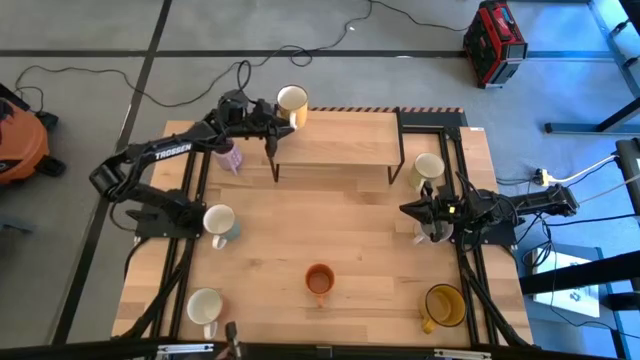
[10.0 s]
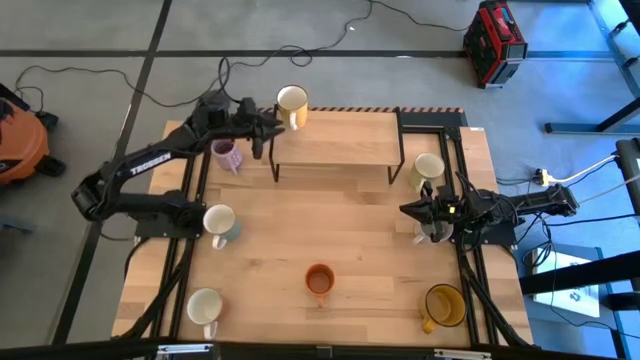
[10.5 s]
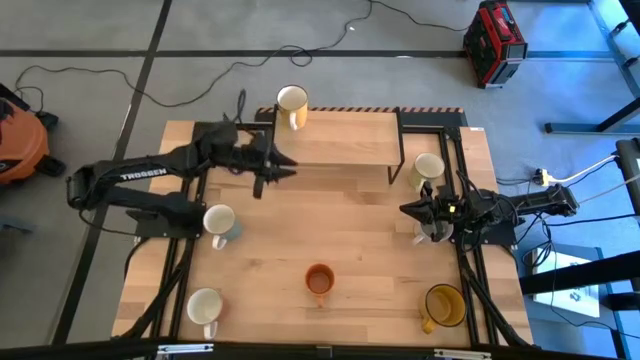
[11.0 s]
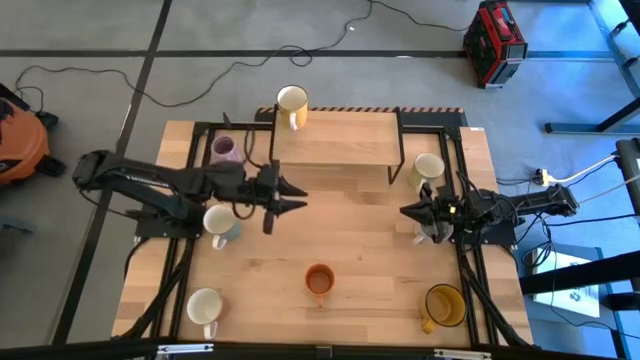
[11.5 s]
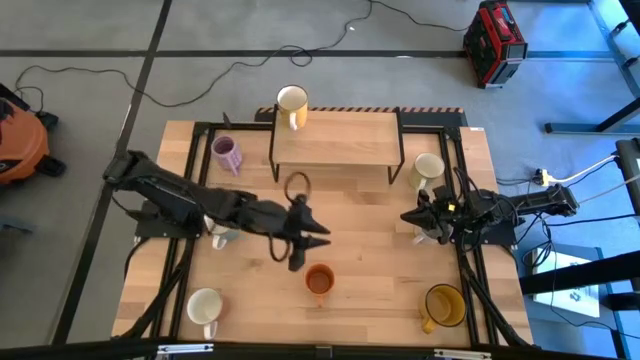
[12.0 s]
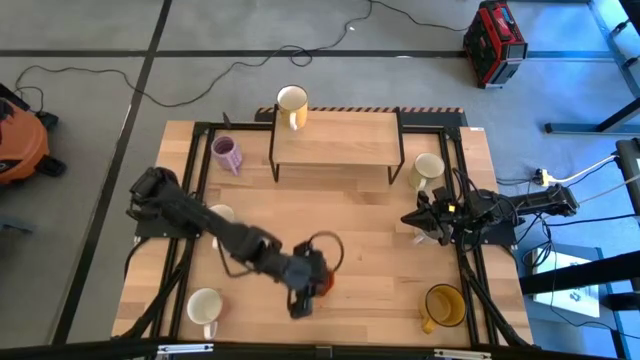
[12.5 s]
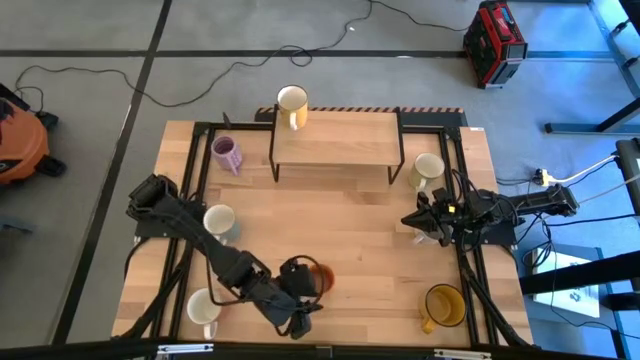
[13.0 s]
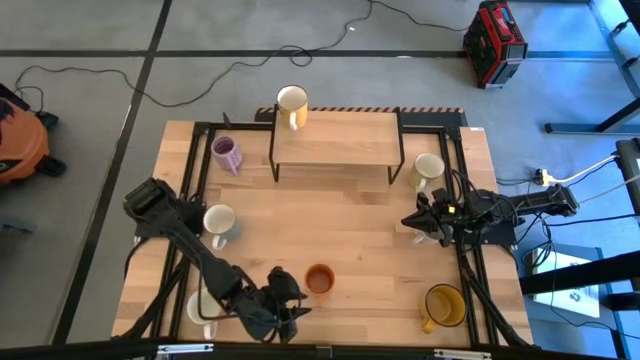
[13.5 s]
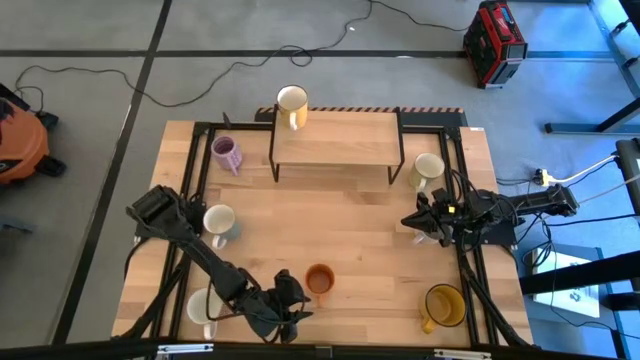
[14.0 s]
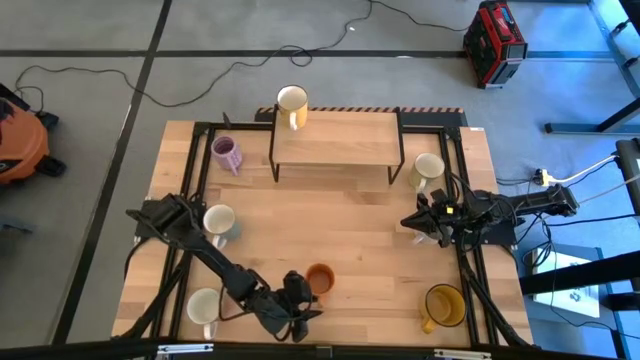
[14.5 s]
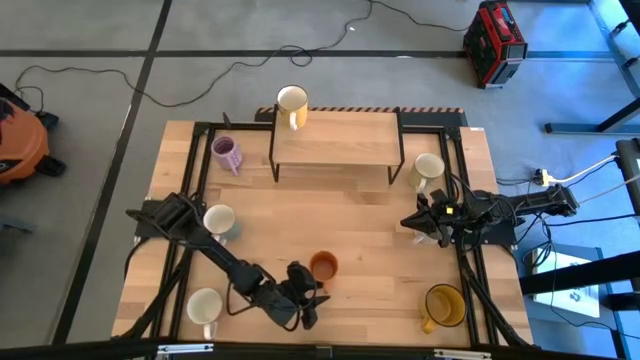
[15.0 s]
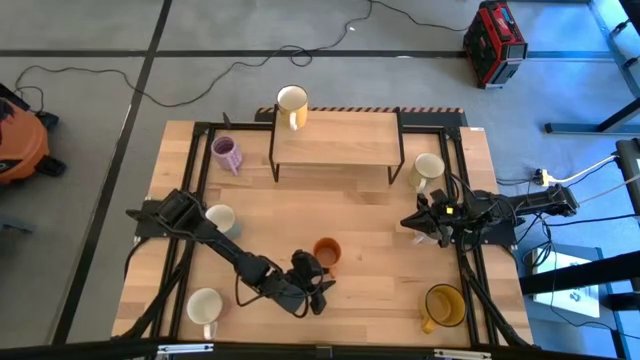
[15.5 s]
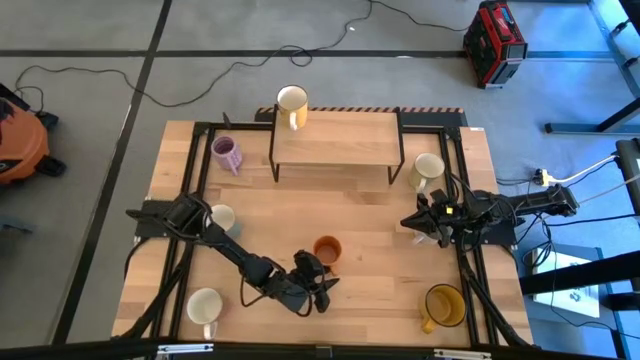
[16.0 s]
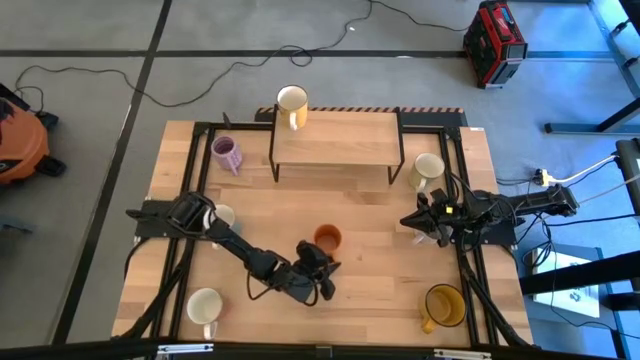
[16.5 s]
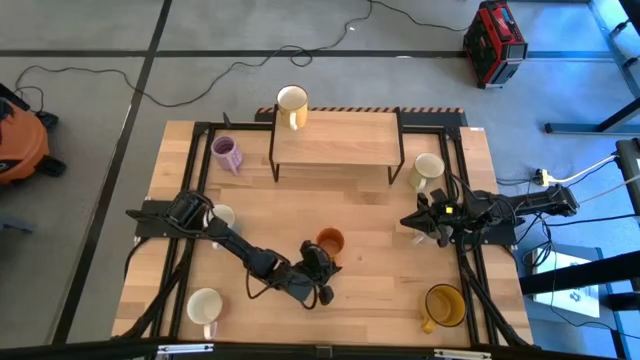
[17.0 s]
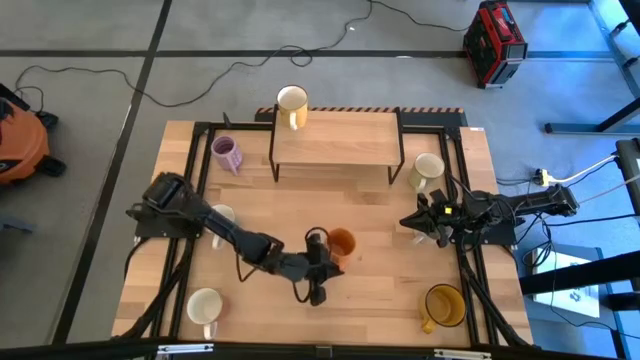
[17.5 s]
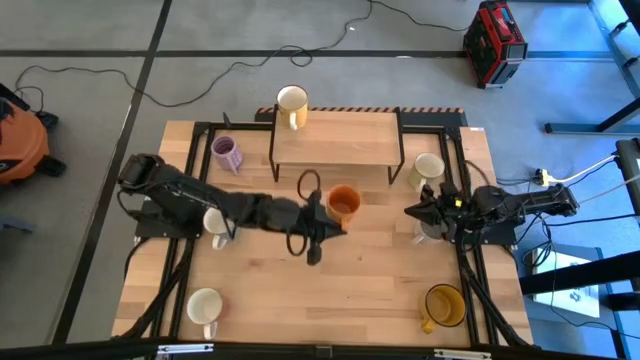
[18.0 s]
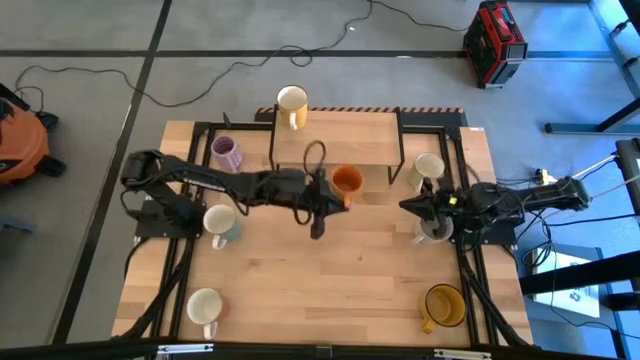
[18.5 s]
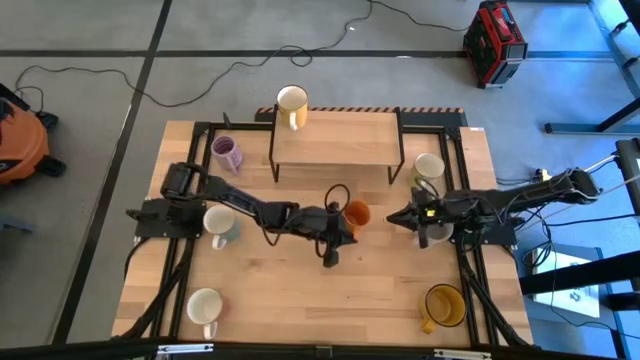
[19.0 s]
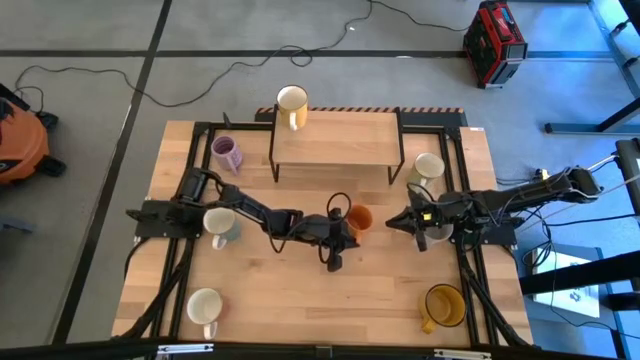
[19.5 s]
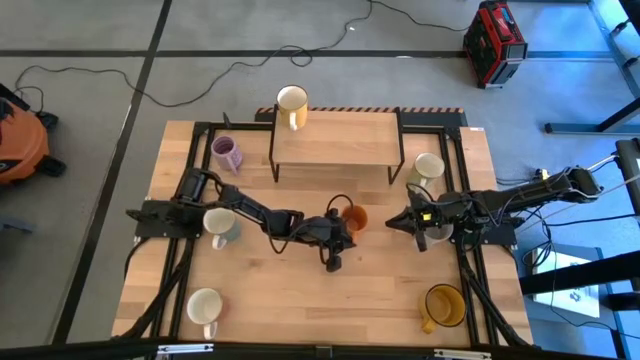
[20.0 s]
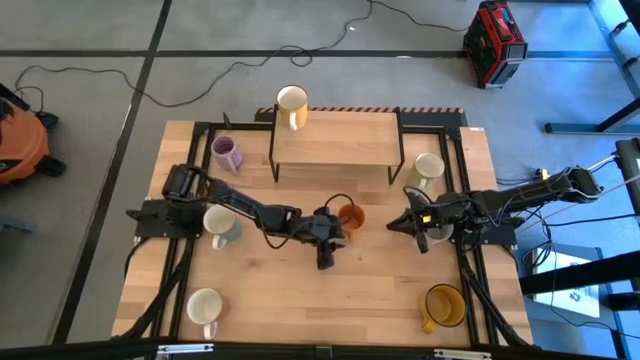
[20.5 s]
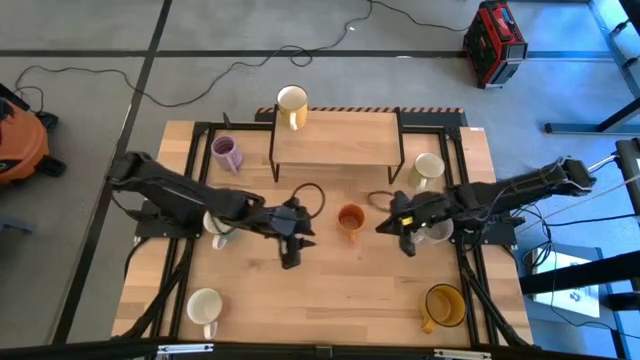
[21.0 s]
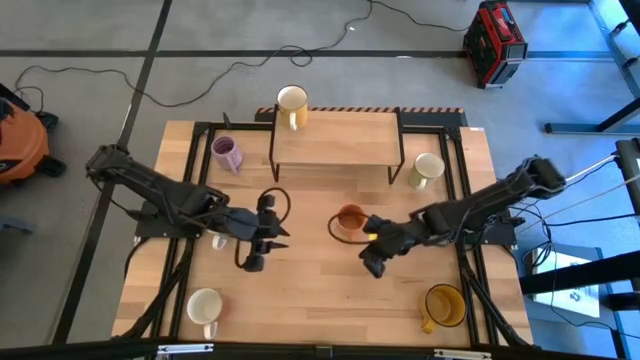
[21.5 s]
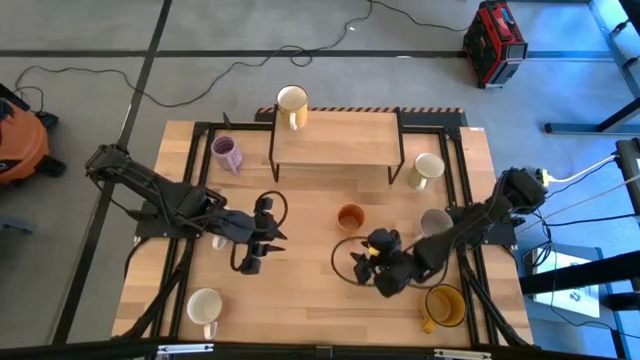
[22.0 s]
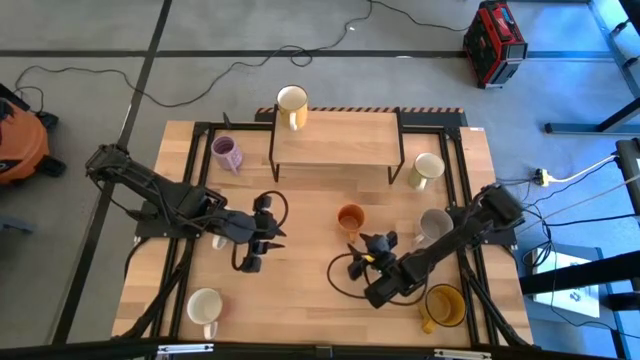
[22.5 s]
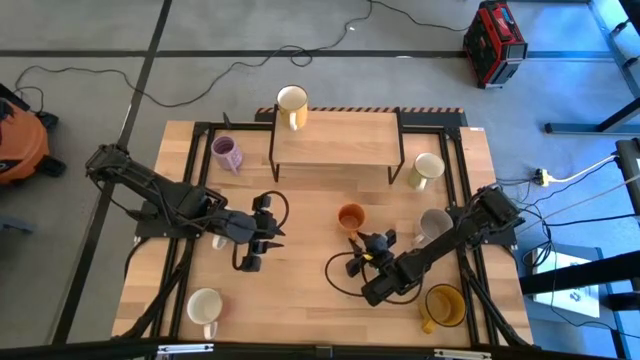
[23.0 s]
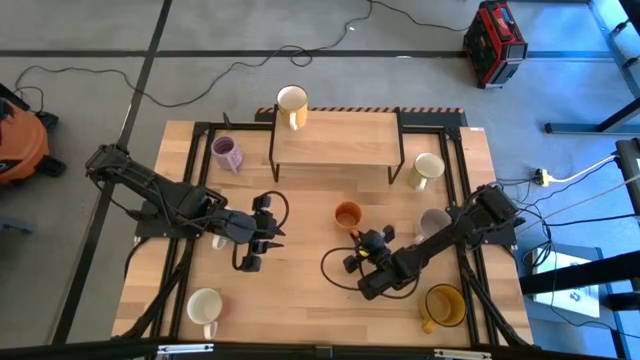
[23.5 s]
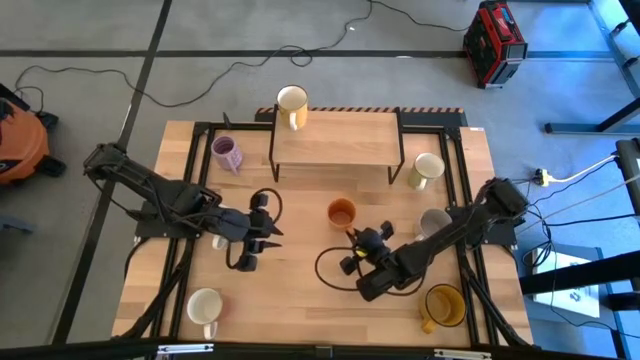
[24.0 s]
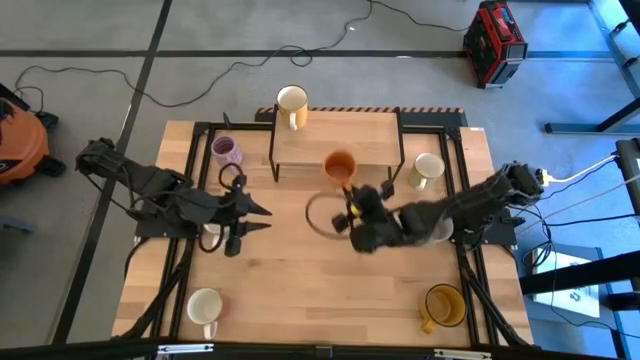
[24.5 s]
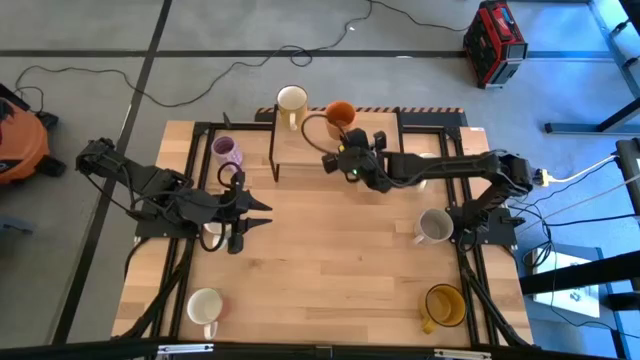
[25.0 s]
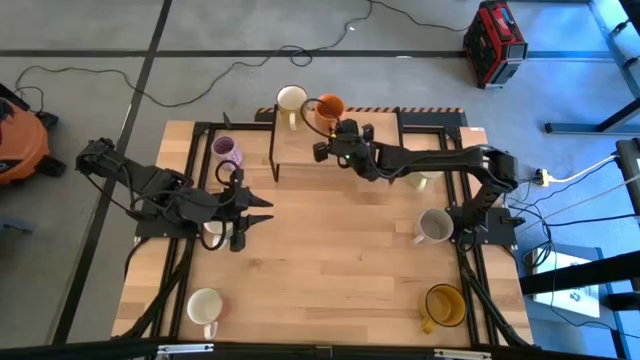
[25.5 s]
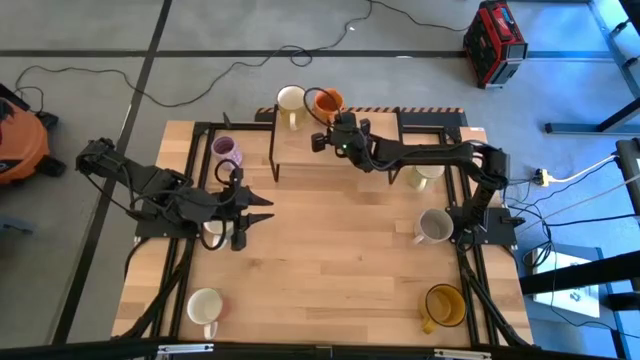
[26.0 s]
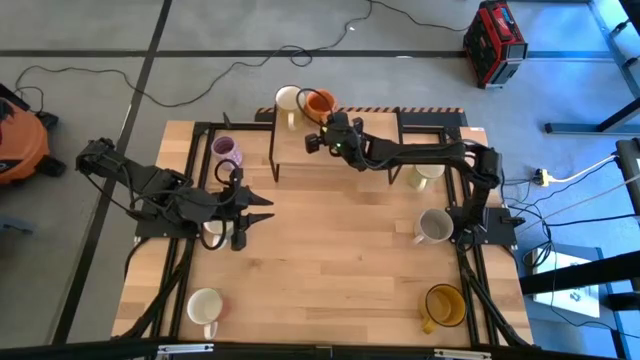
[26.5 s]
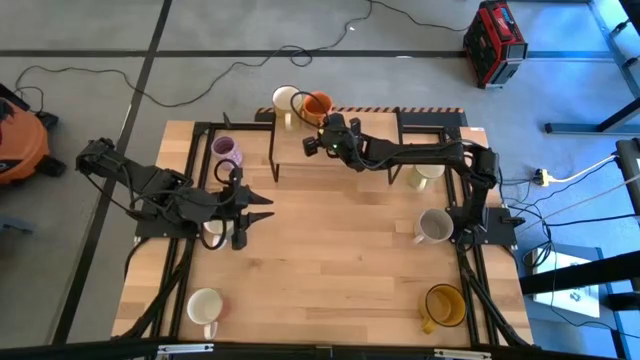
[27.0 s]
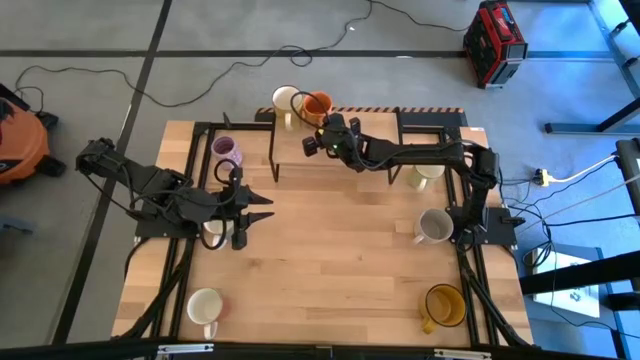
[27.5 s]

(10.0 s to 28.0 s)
Task: Place coffee mugs
Put the orange mug on the shelf
